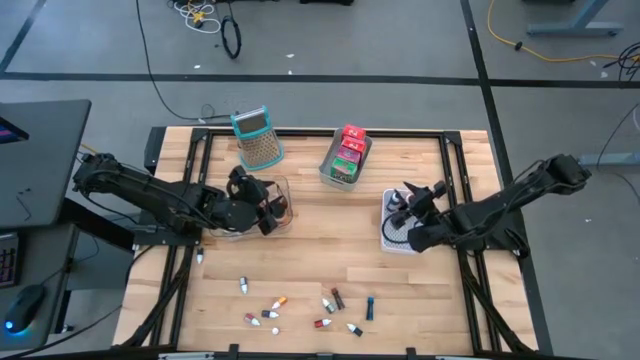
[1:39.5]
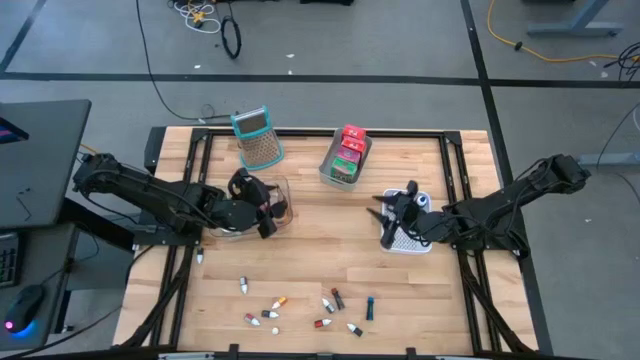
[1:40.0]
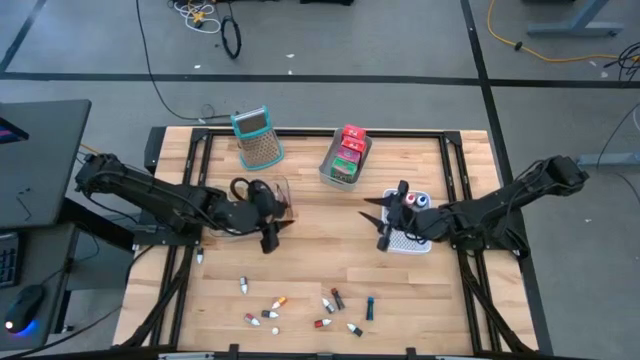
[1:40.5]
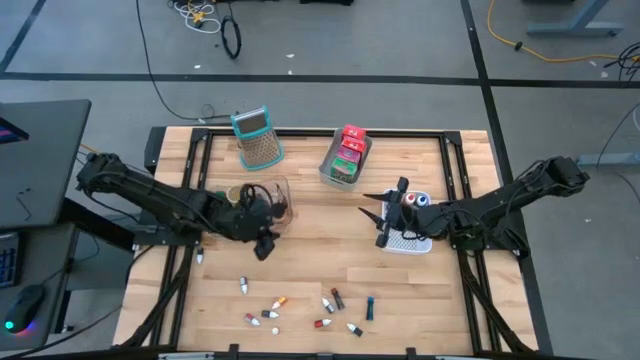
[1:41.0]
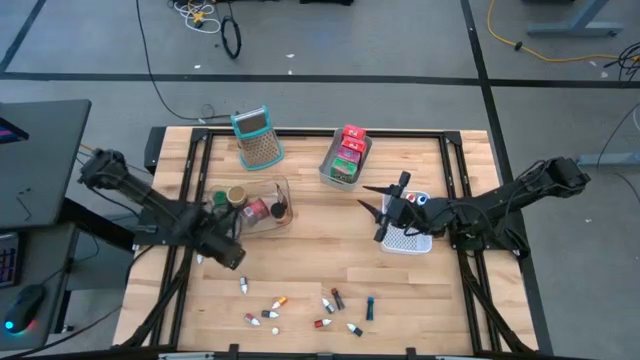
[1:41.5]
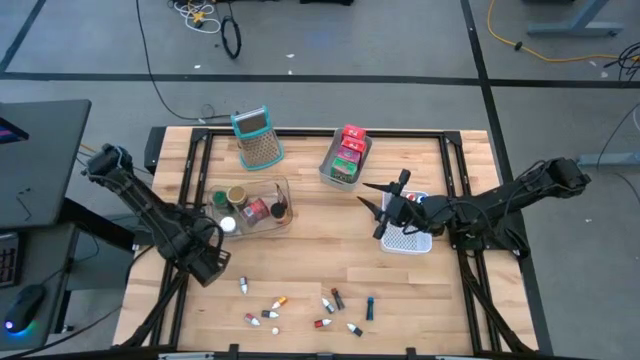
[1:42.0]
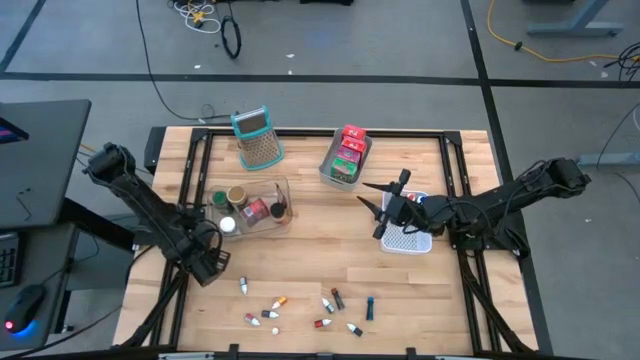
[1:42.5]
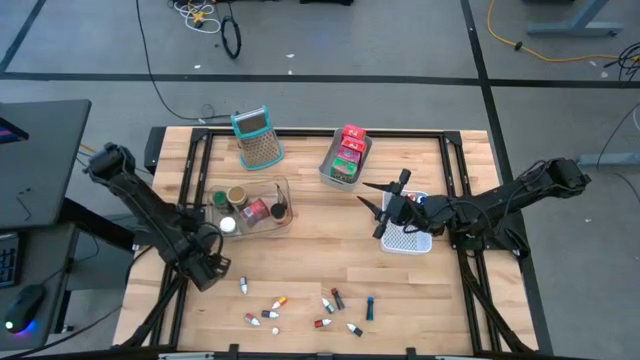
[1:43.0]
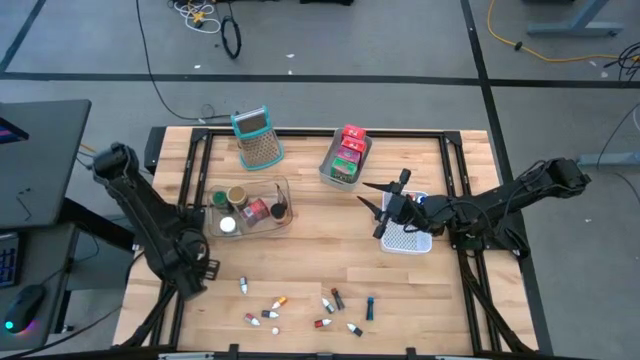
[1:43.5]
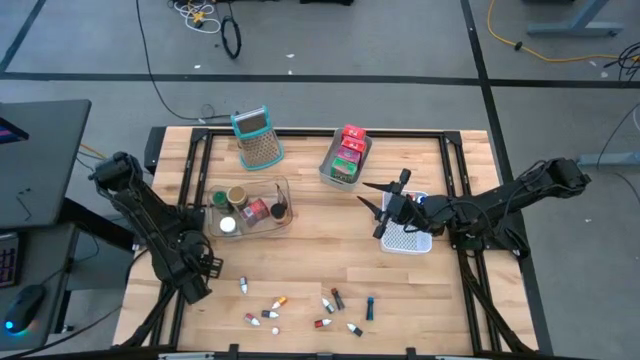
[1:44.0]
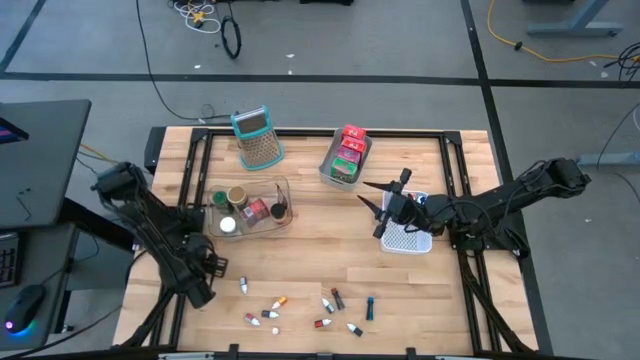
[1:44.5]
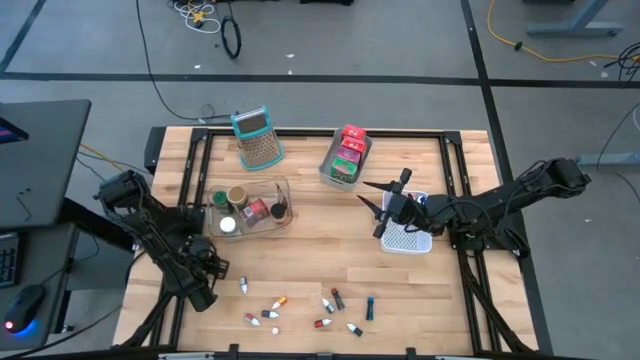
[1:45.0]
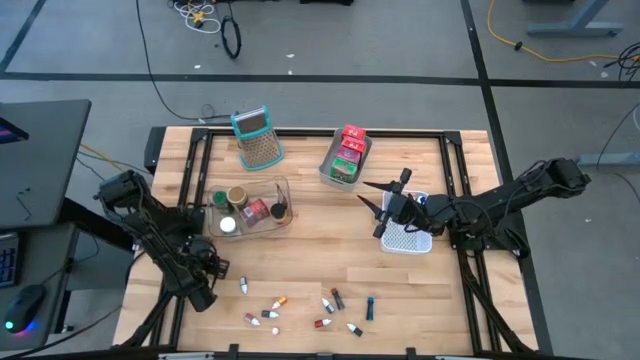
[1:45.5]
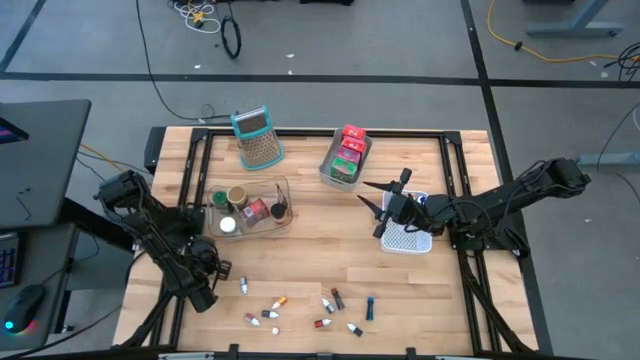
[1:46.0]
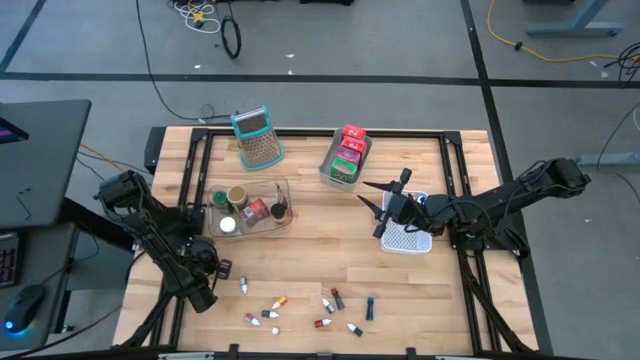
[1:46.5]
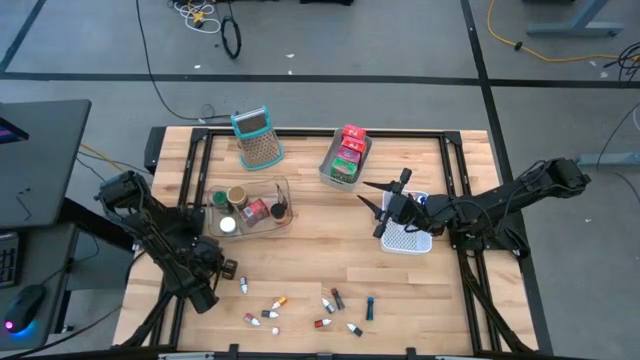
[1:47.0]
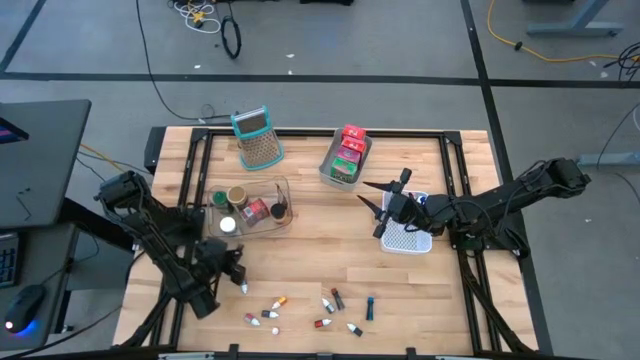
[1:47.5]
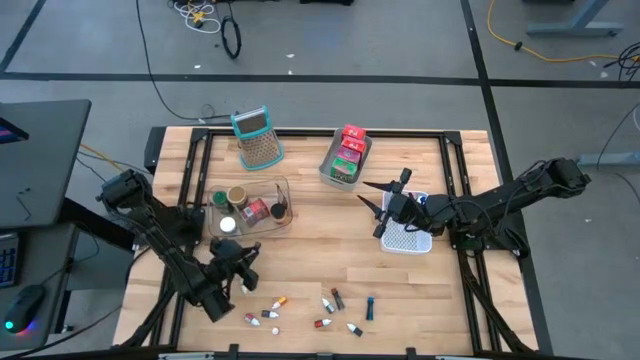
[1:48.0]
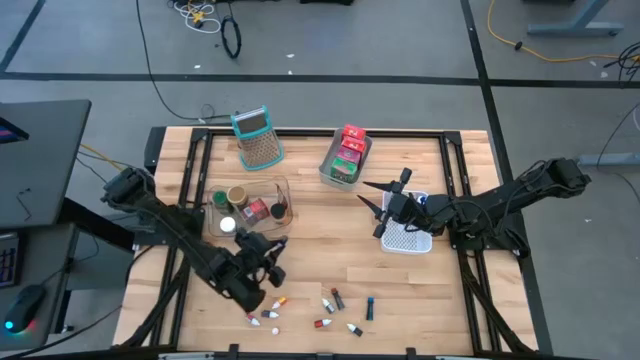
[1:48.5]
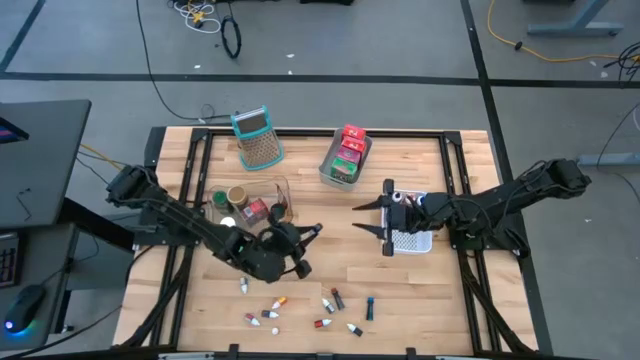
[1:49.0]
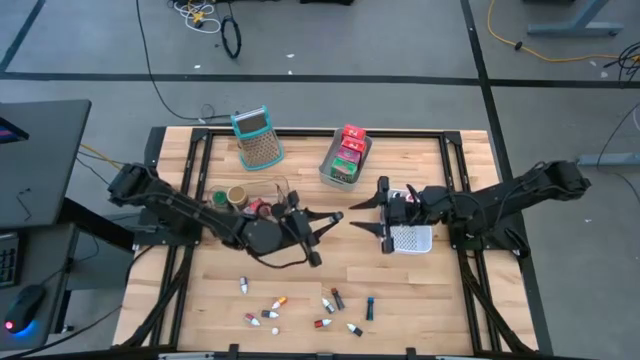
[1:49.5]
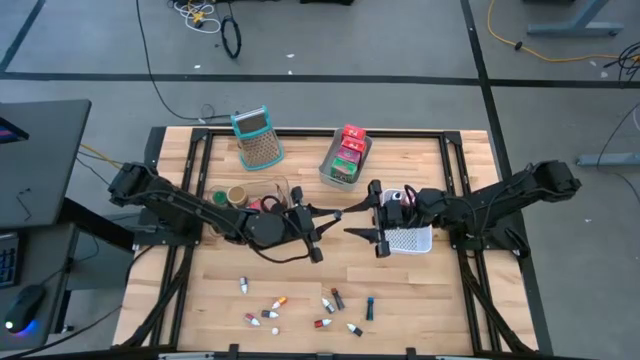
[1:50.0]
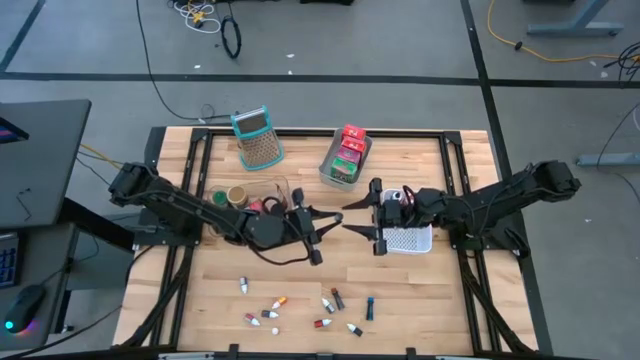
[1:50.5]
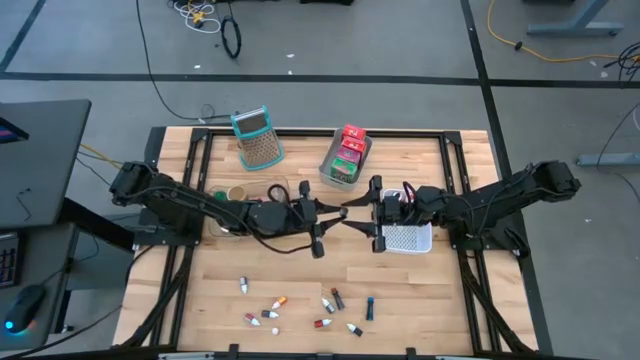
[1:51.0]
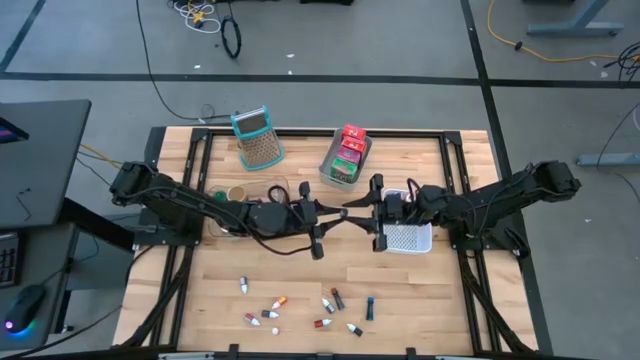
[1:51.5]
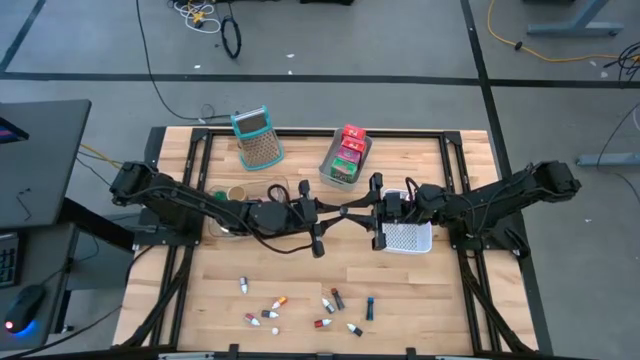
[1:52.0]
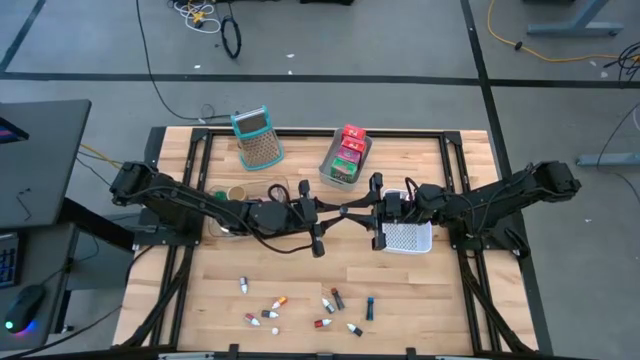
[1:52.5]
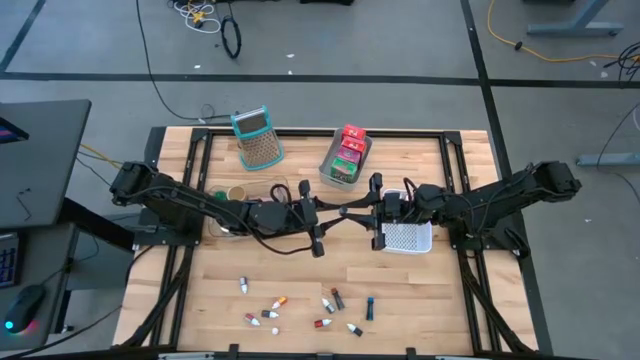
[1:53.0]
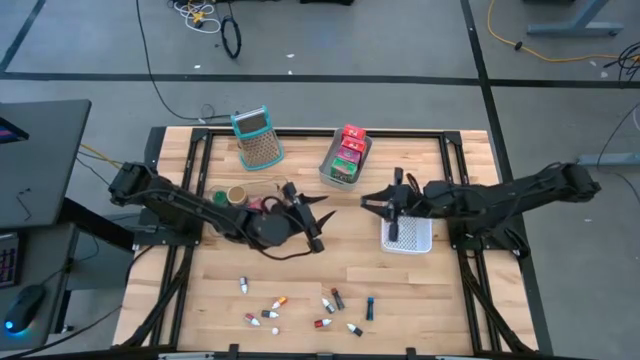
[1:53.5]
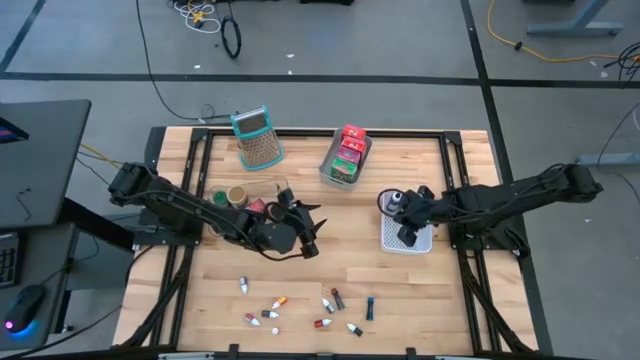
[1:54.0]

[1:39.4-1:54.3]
Task: Pick & Place Kitchen Items
Put the green food coloring bottle into the white bin

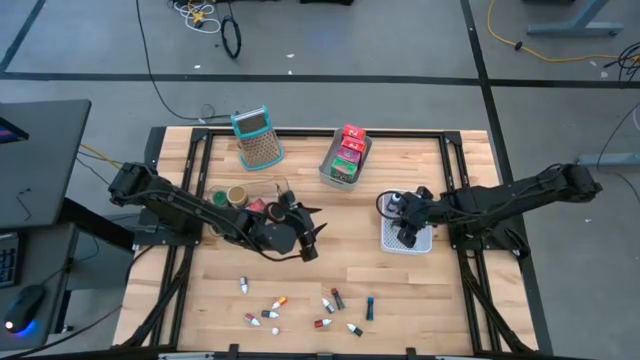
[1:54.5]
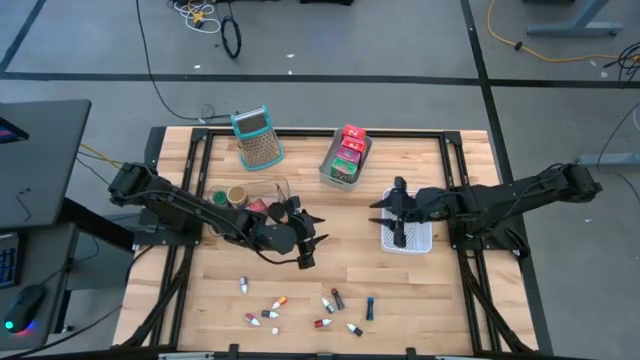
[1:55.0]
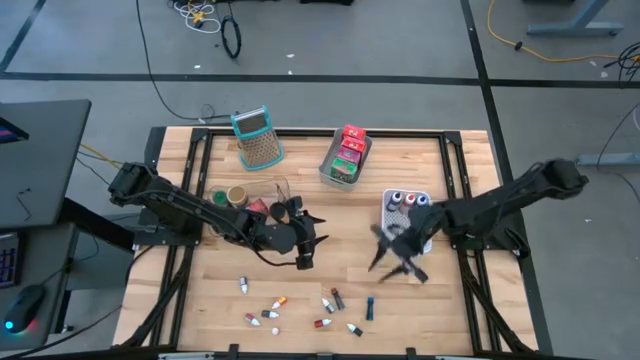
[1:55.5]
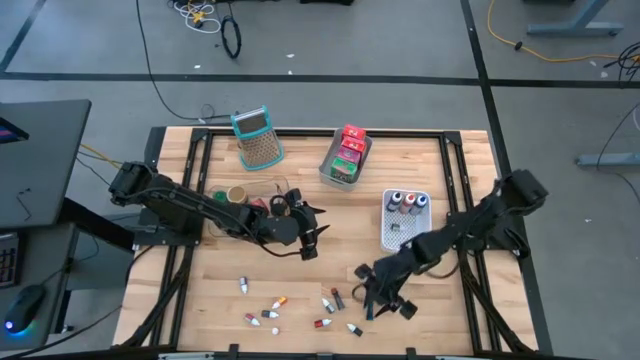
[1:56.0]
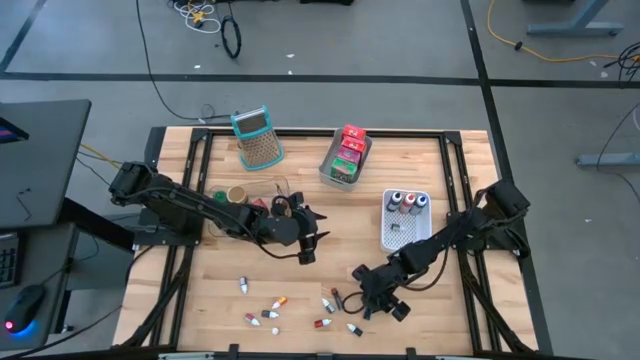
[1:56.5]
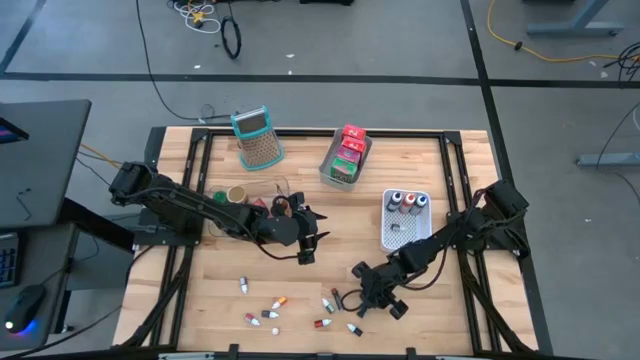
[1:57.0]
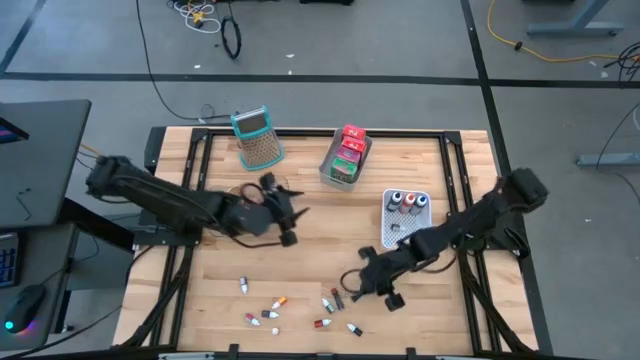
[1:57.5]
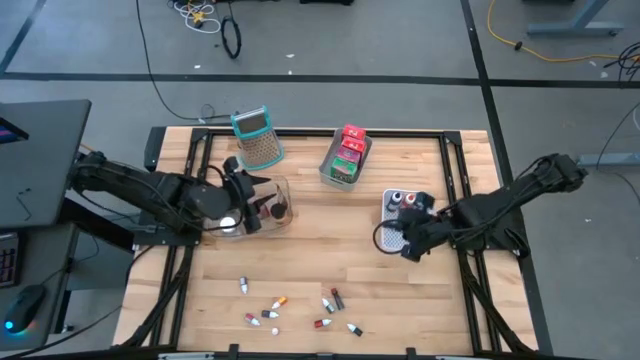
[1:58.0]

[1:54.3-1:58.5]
Put the blue food coloring bottle into the white bin

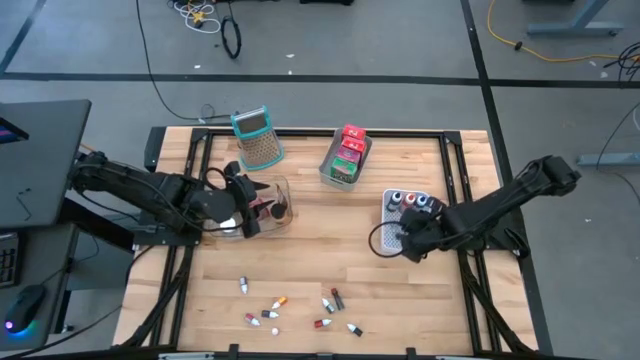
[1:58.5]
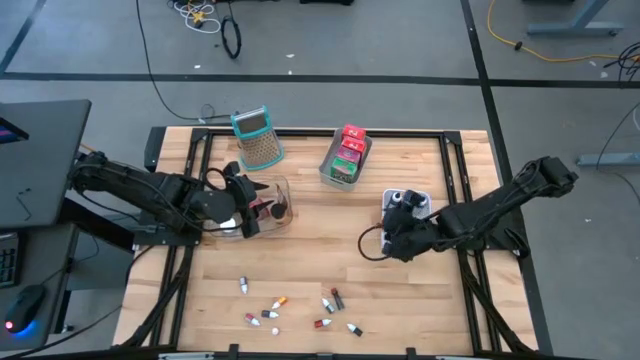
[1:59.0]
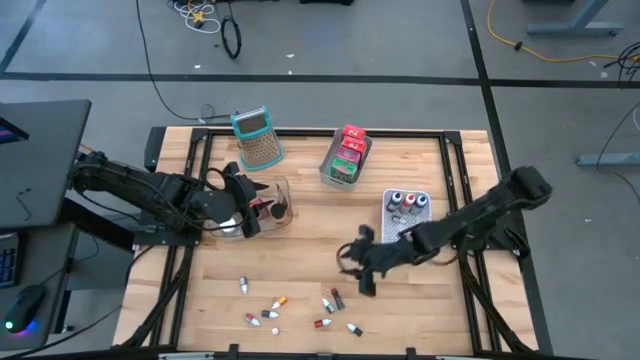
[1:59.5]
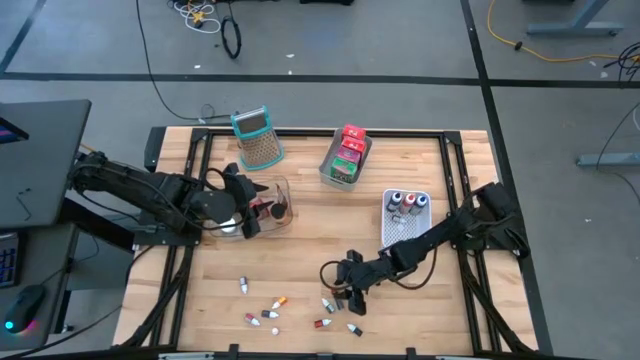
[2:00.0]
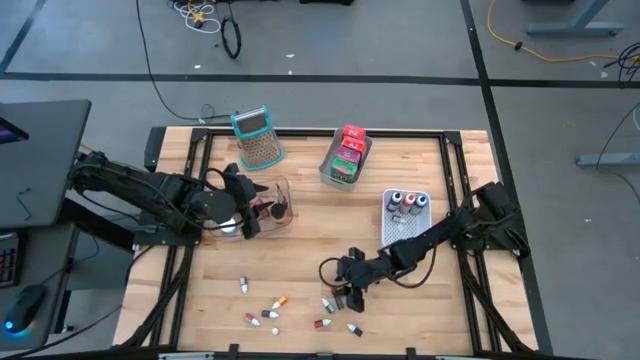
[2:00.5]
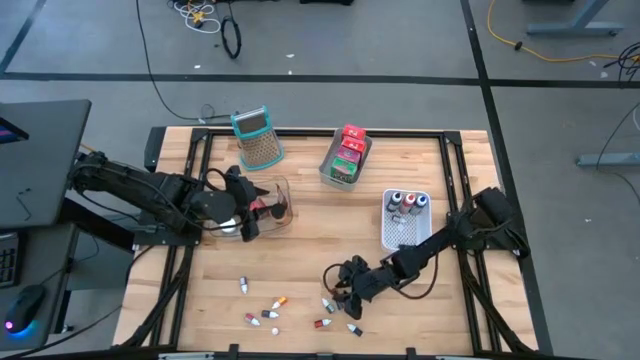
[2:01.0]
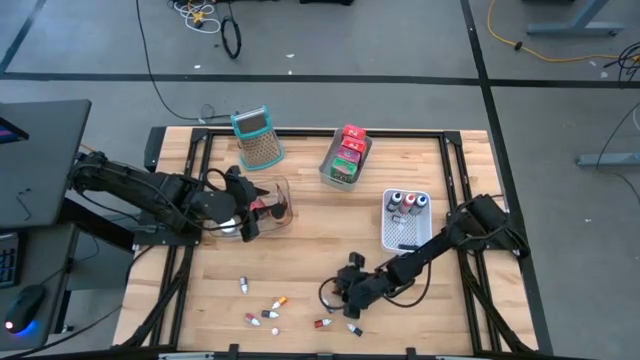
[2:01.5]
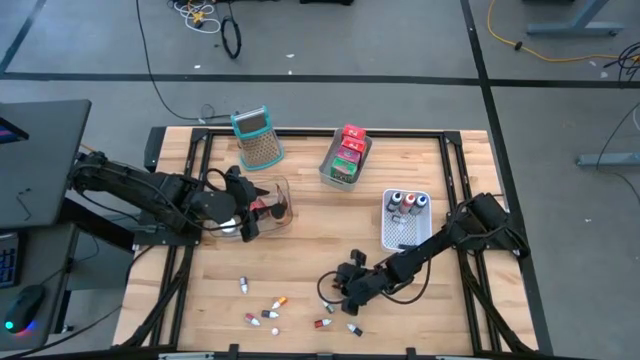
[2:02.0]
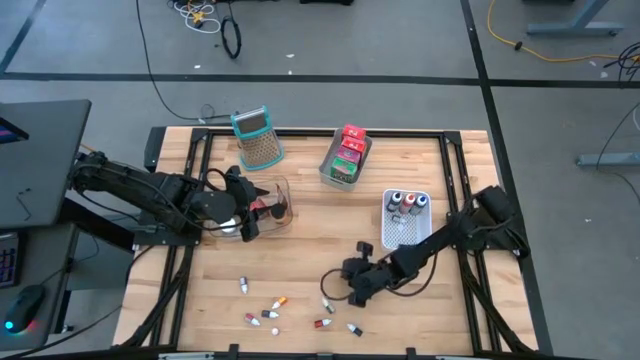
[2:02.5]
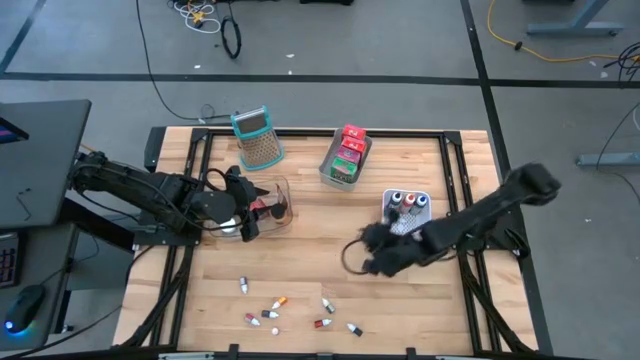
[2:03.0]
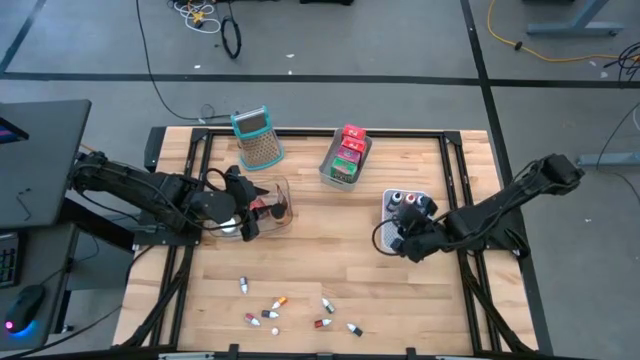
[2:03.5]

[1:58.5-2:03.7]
Put the orange food coloring bottle into the white bin
